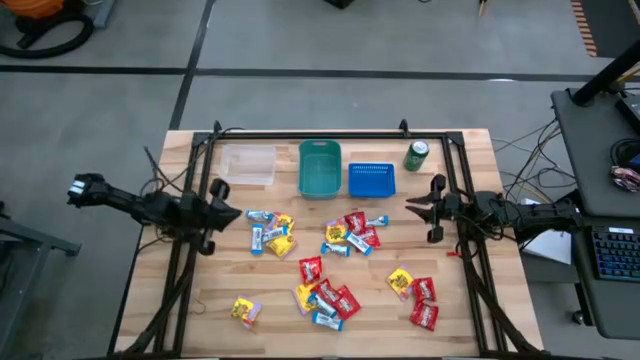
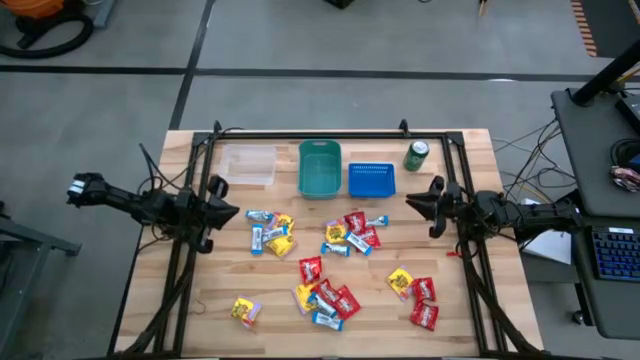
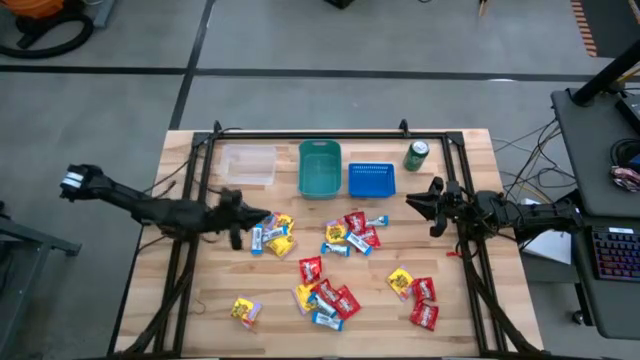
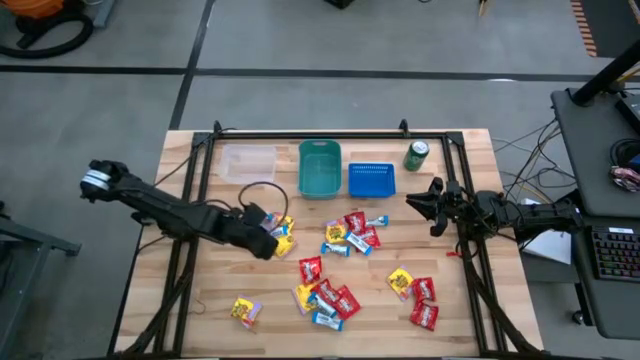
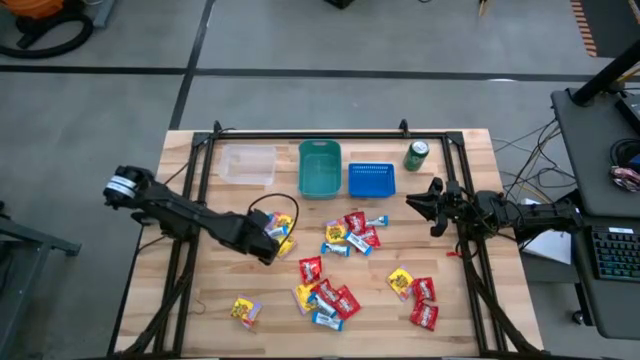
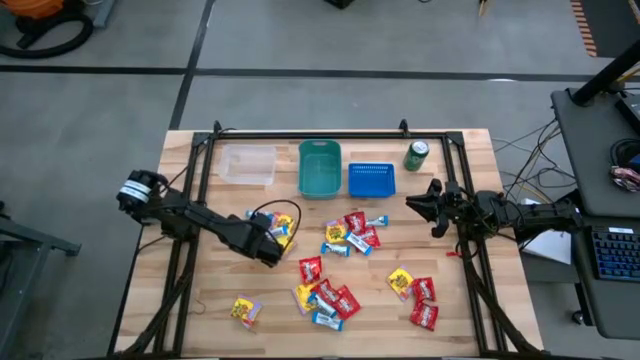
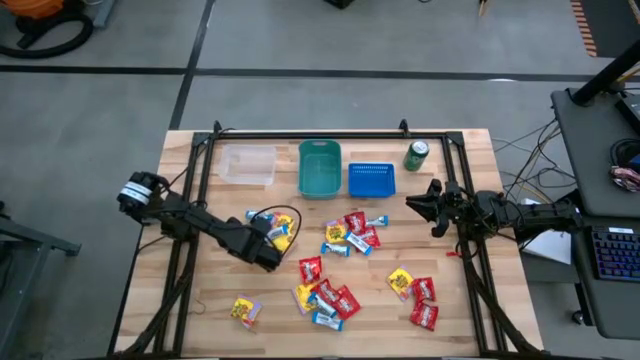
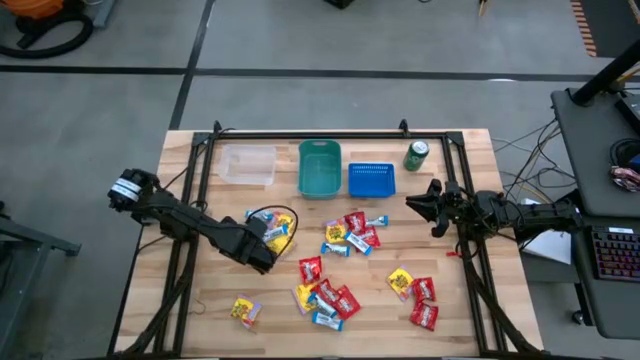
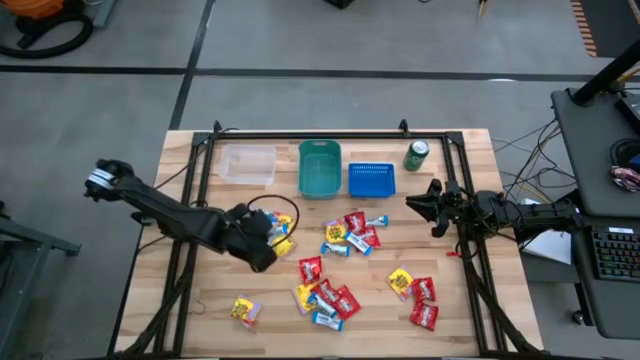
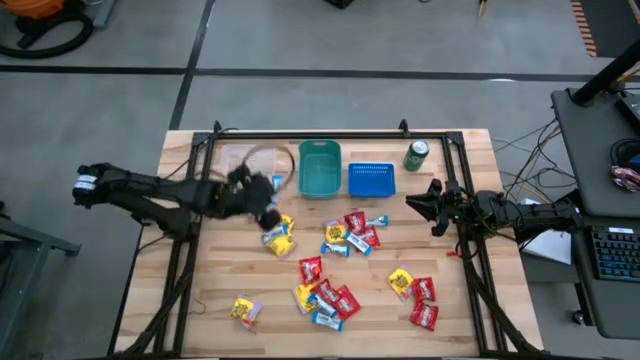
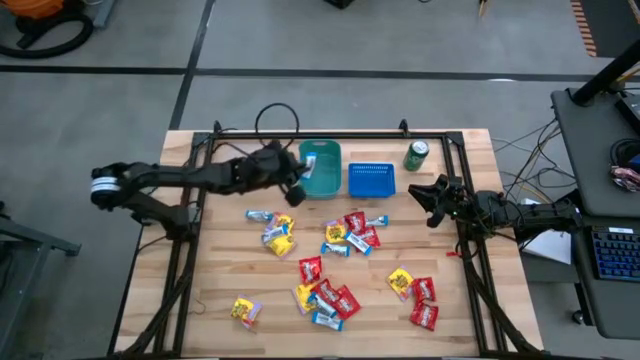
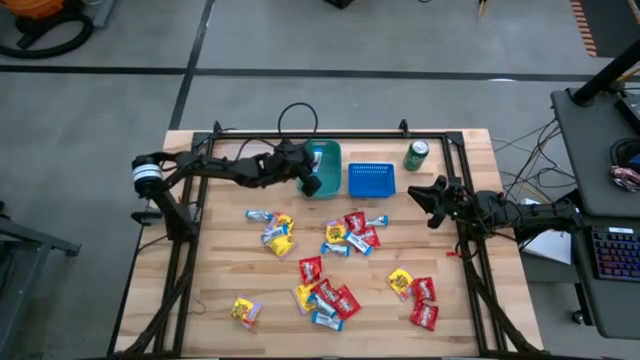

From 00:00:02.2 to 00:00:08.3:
Task: Sort candy
Put the white chocolate into the green bin

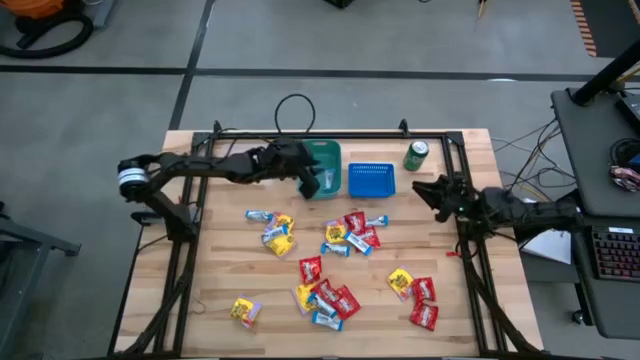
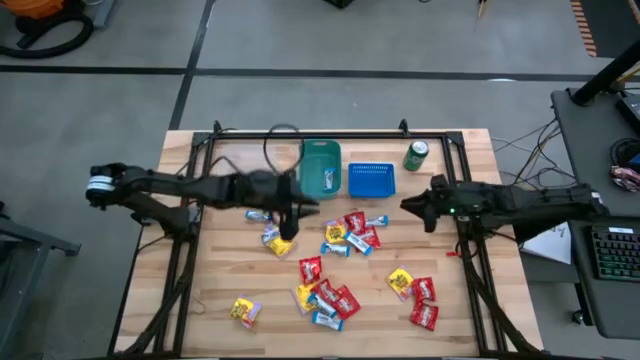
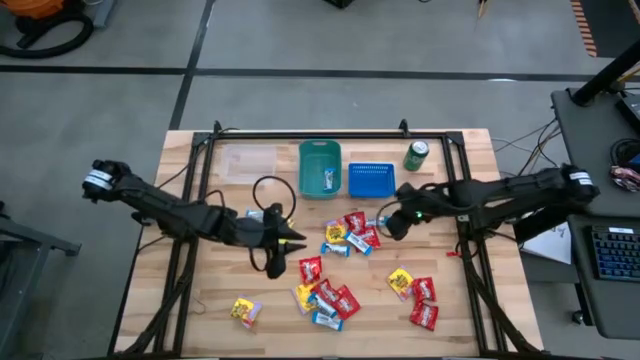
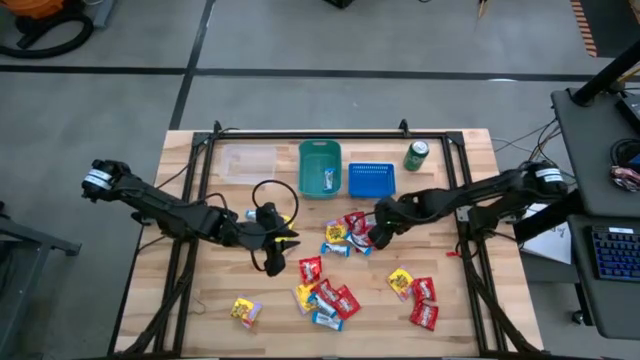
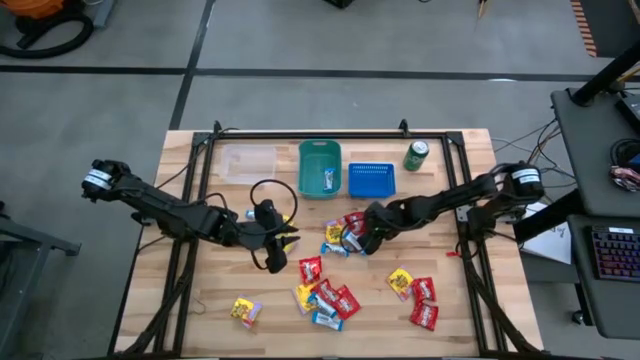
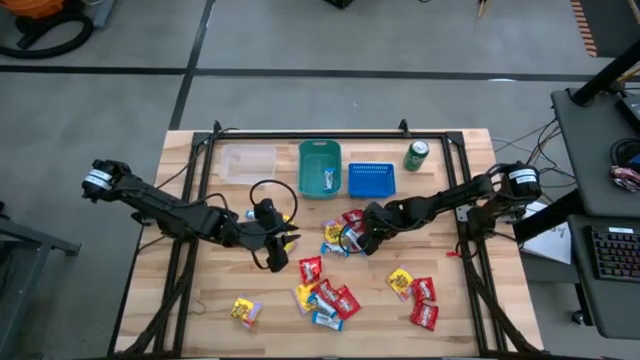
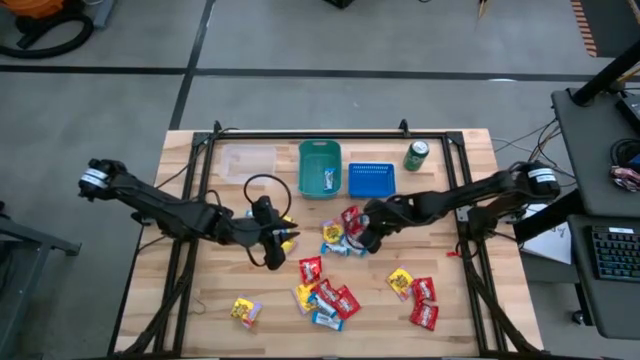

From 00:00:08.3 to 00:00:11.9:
Put the red candy into the blue bin

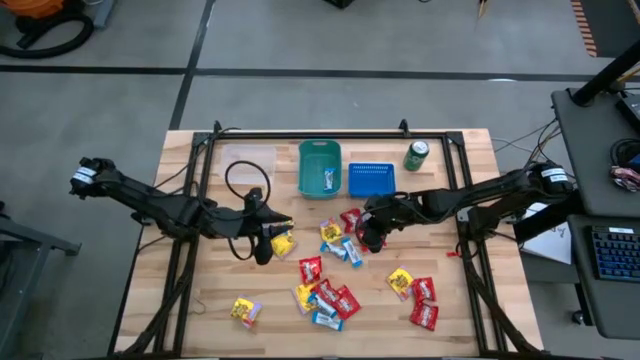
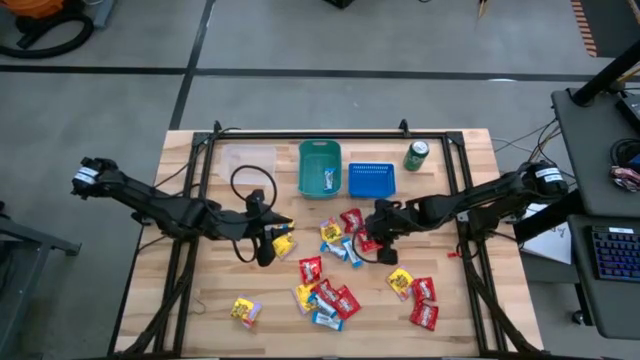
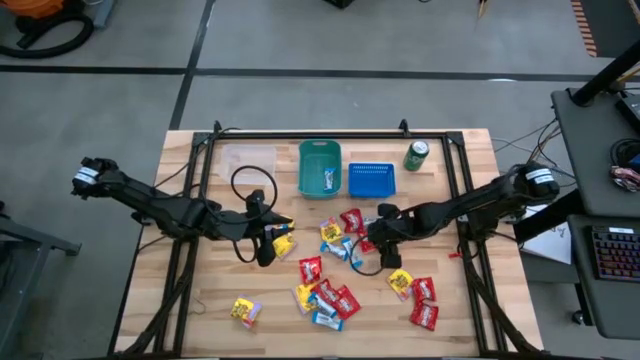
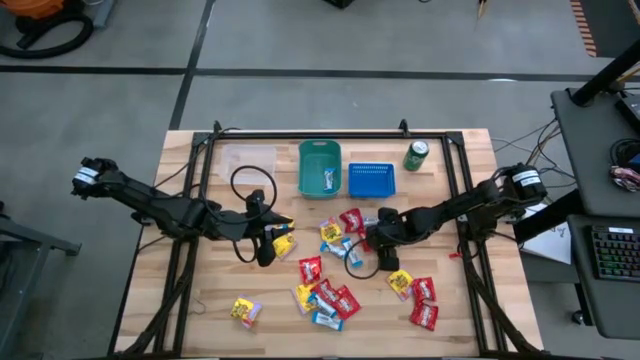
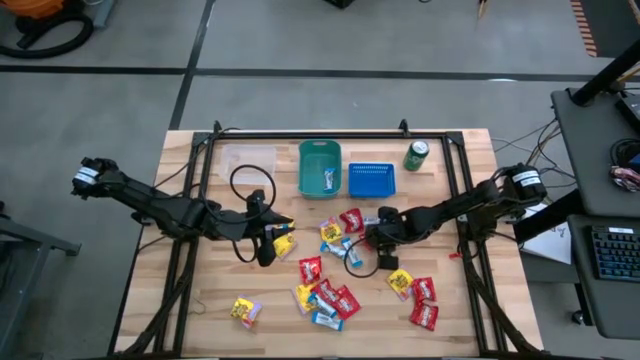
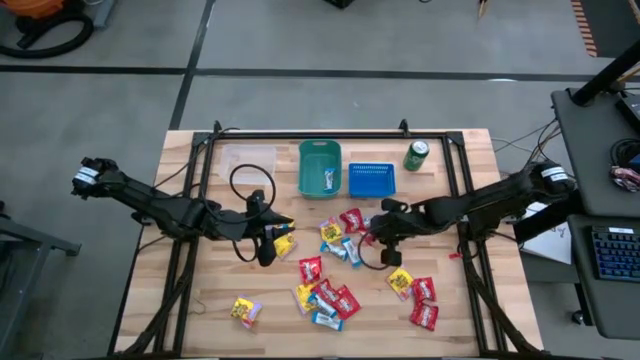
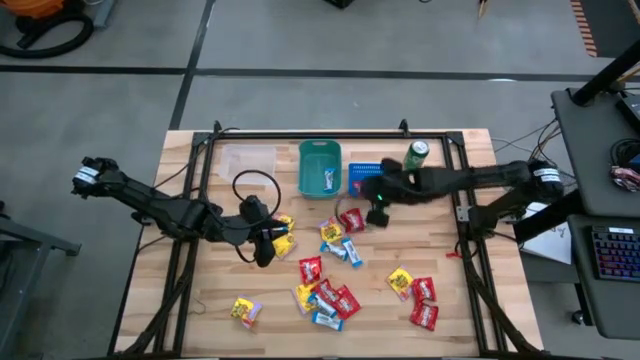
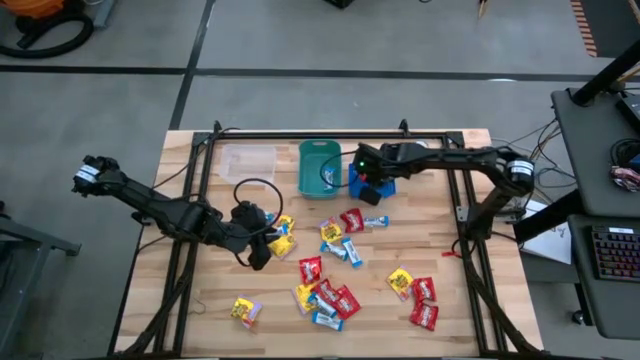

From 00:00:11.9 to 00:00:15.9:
Put the red candy into the blue bin

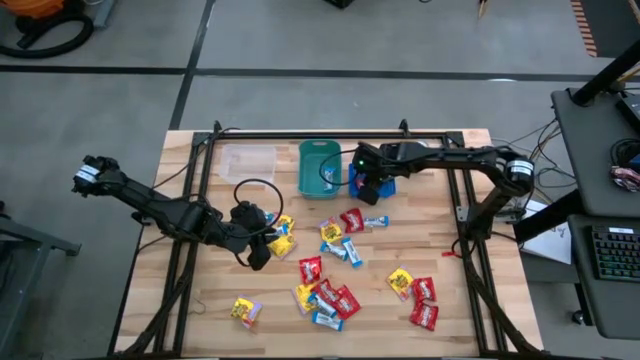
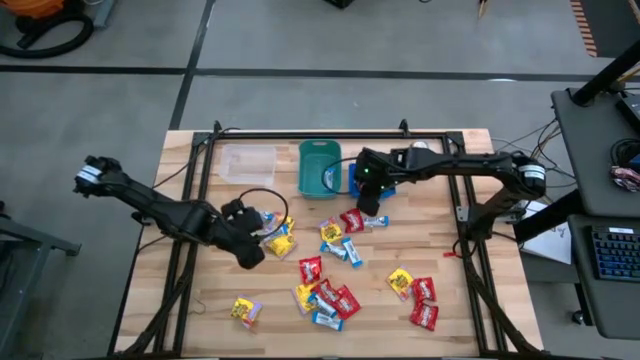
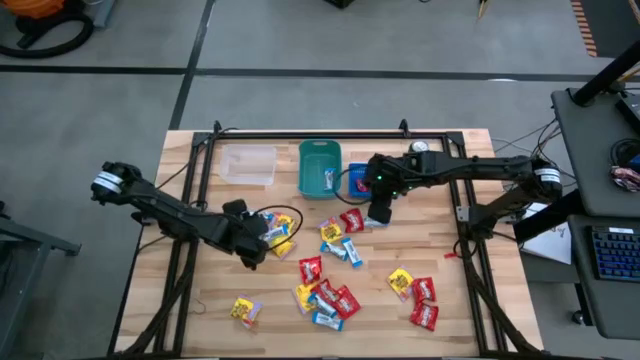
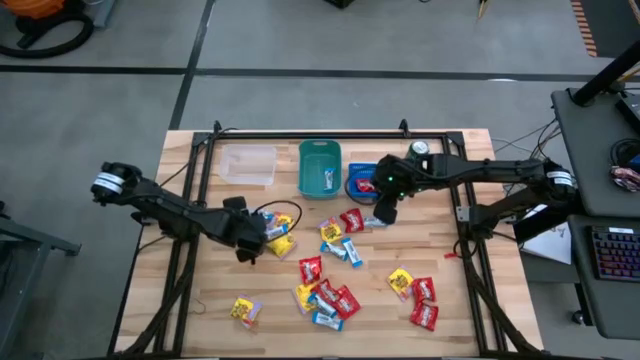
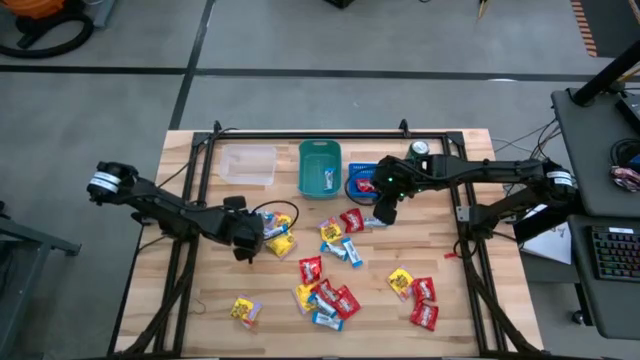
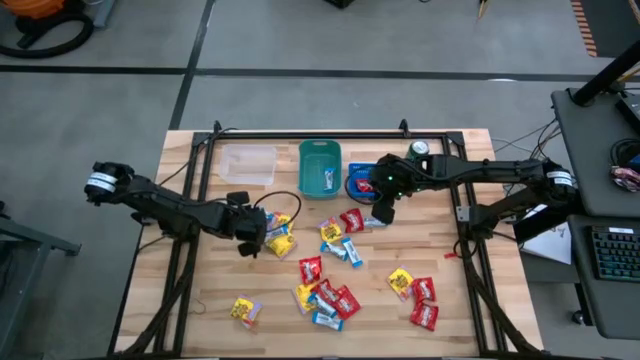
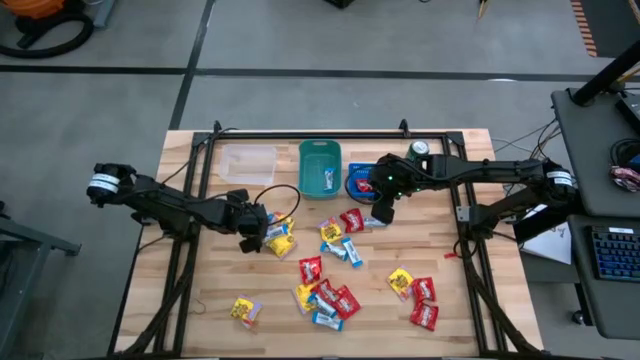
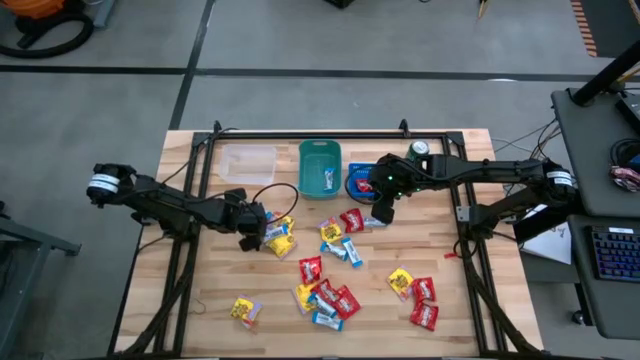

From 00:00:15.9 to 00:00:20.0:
Put the white chocolate into the green bin

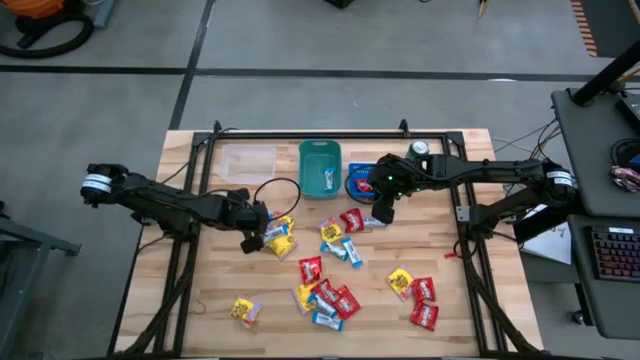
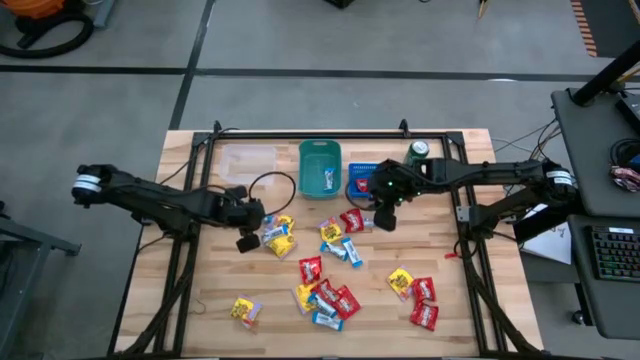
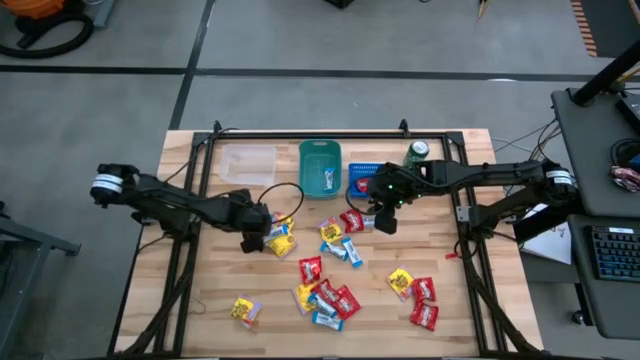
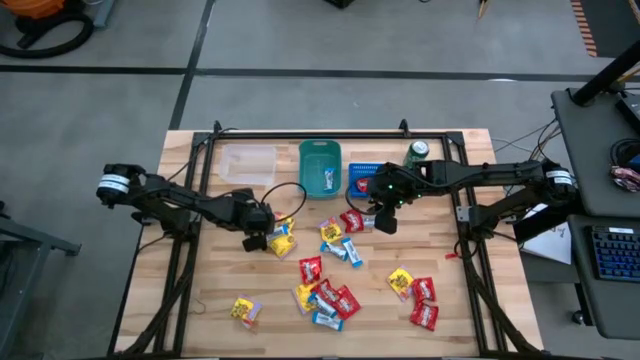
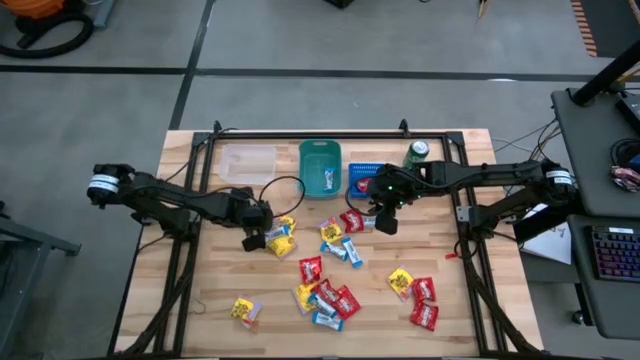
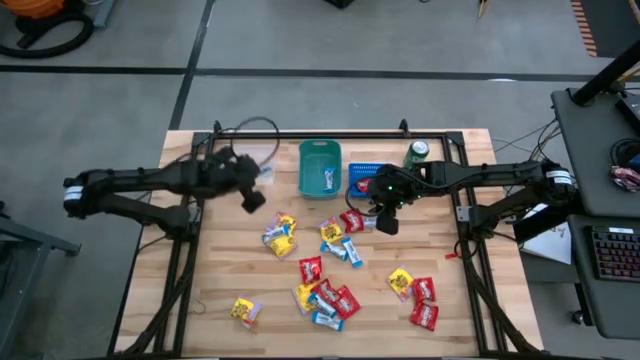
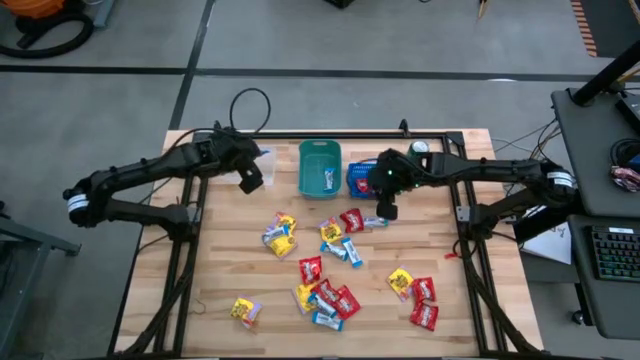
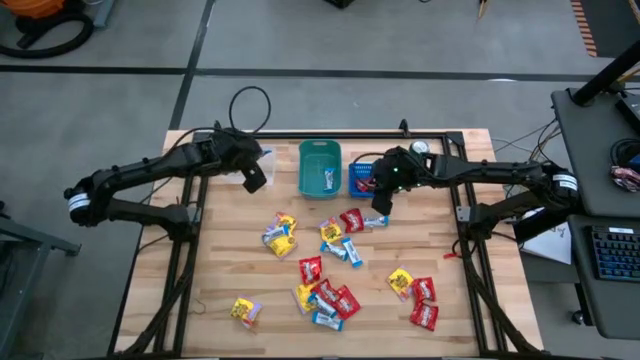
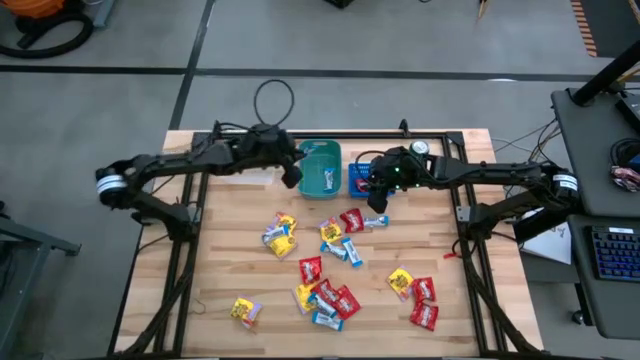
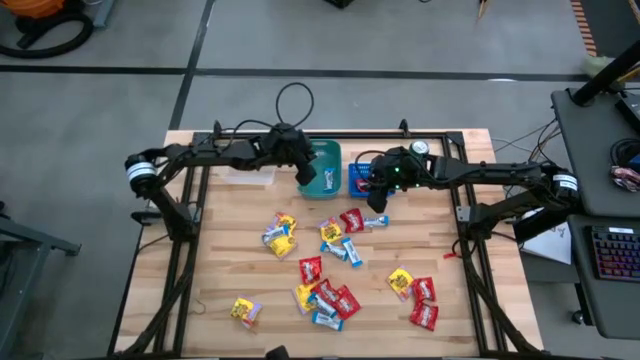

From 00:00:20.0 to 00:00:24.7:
Put the white chocolate into the green bin
